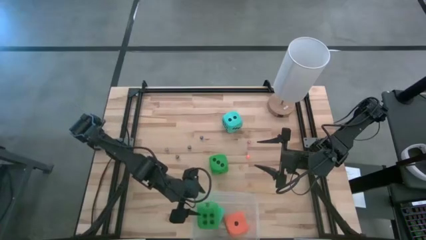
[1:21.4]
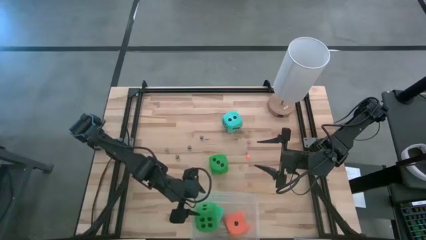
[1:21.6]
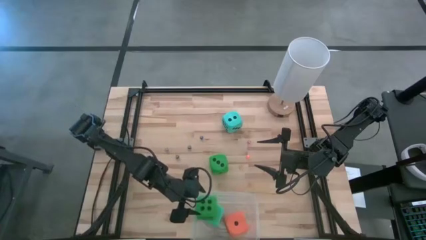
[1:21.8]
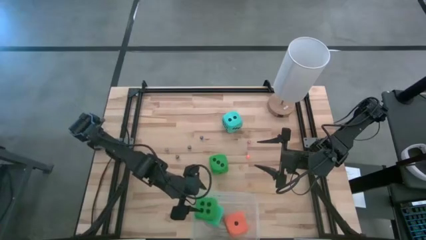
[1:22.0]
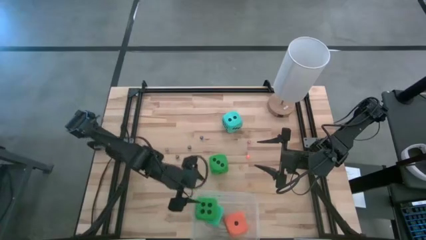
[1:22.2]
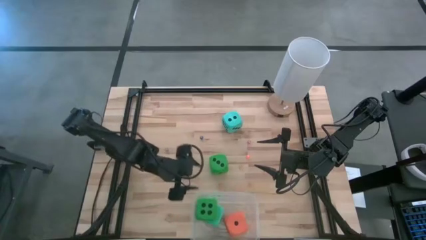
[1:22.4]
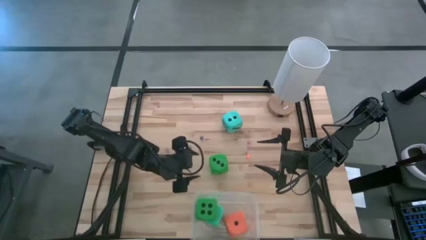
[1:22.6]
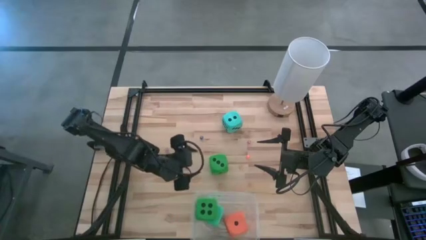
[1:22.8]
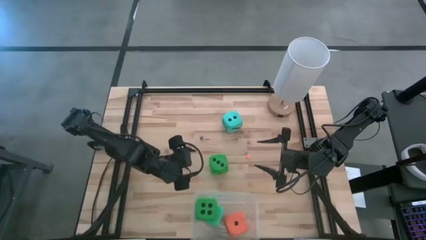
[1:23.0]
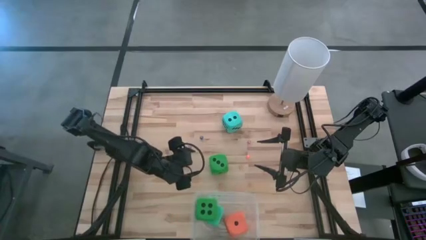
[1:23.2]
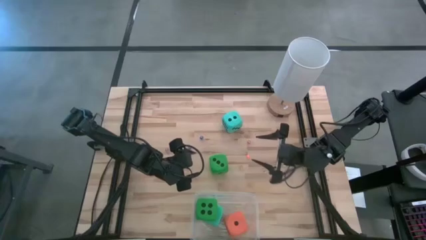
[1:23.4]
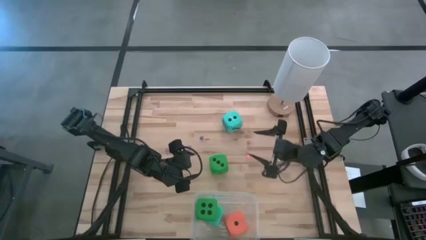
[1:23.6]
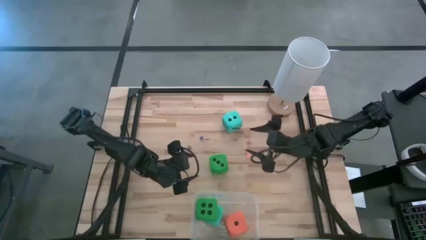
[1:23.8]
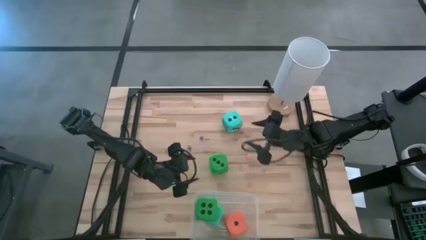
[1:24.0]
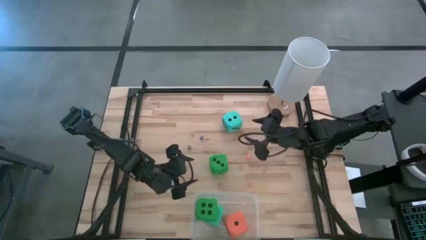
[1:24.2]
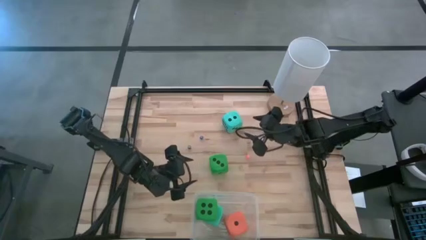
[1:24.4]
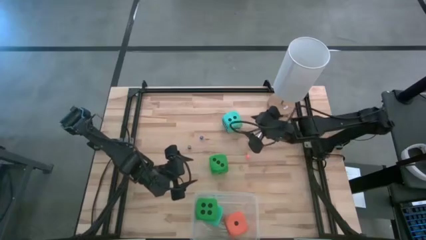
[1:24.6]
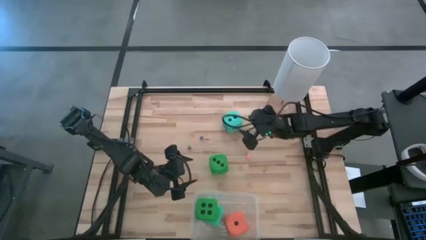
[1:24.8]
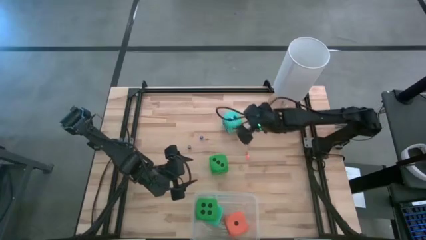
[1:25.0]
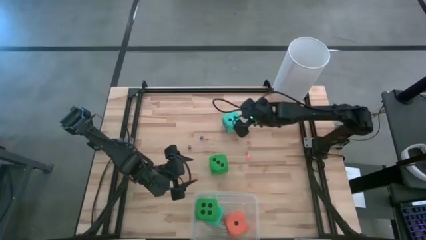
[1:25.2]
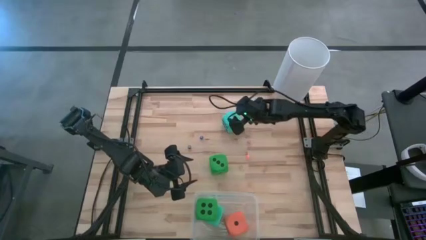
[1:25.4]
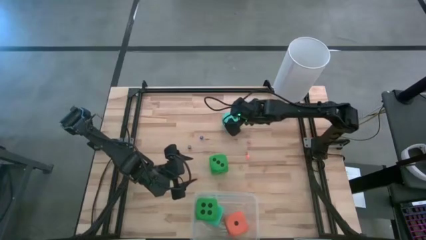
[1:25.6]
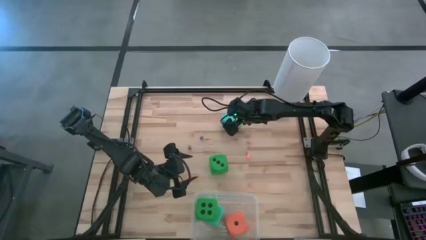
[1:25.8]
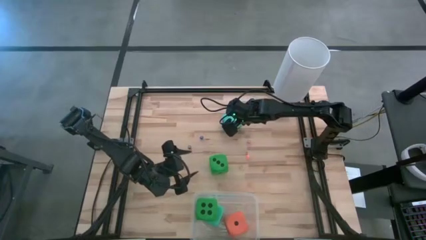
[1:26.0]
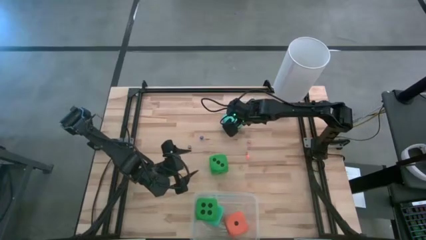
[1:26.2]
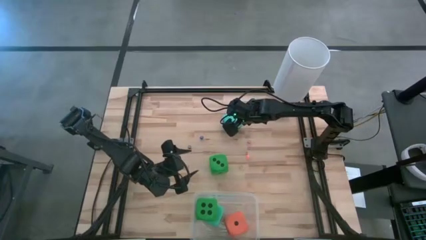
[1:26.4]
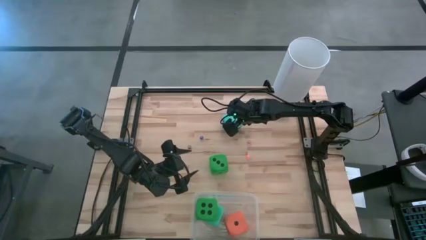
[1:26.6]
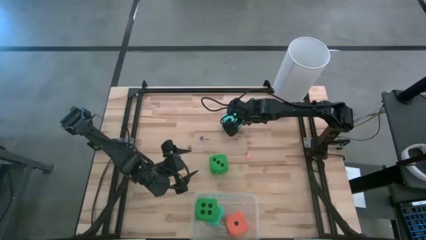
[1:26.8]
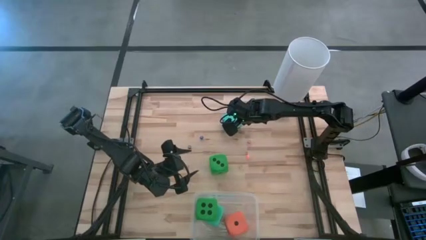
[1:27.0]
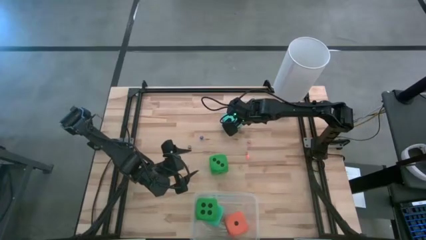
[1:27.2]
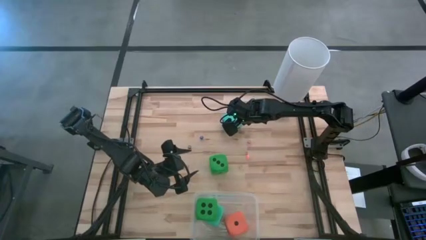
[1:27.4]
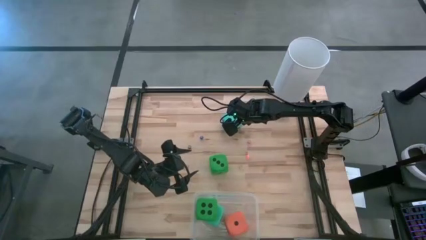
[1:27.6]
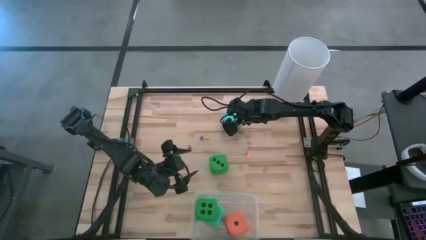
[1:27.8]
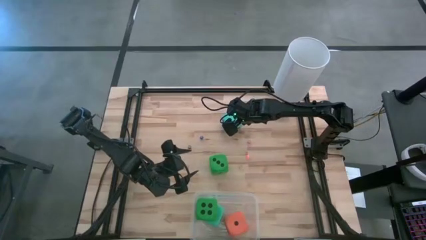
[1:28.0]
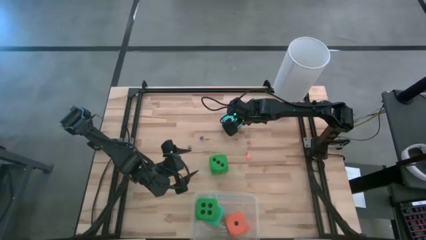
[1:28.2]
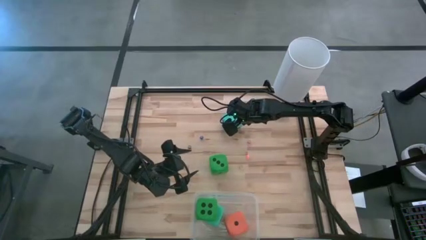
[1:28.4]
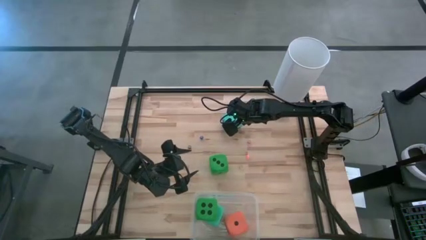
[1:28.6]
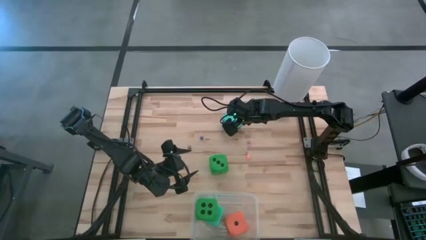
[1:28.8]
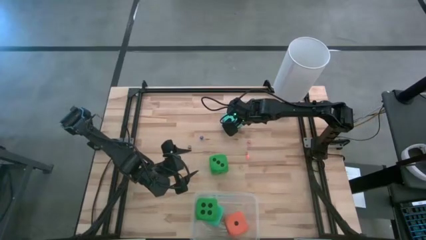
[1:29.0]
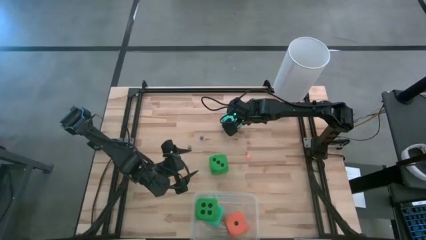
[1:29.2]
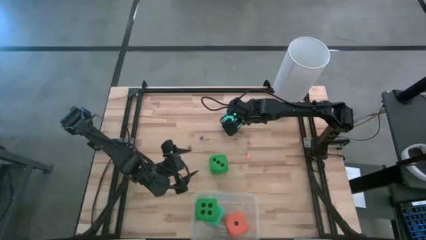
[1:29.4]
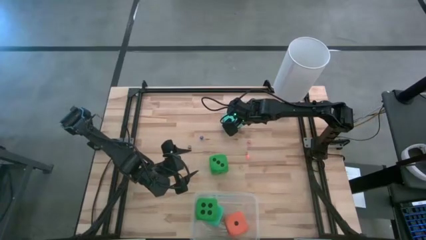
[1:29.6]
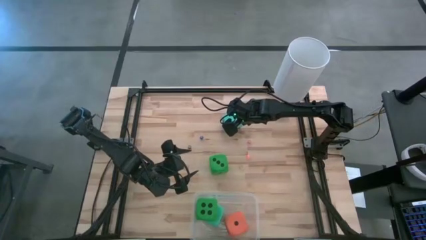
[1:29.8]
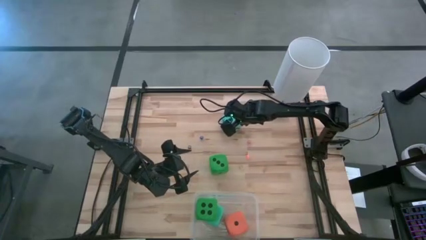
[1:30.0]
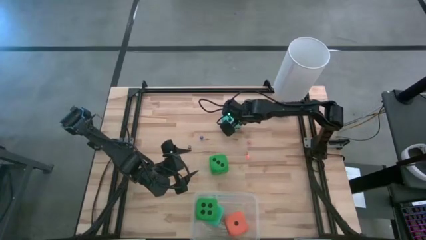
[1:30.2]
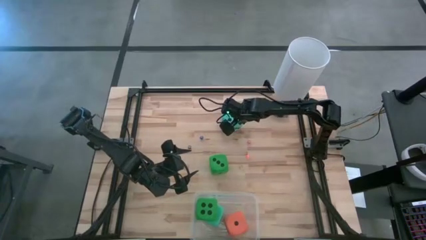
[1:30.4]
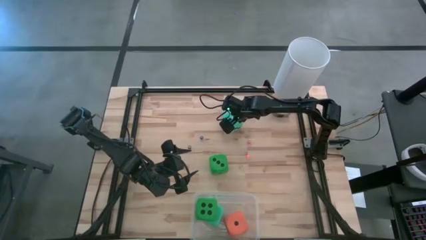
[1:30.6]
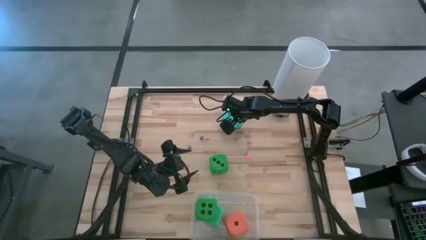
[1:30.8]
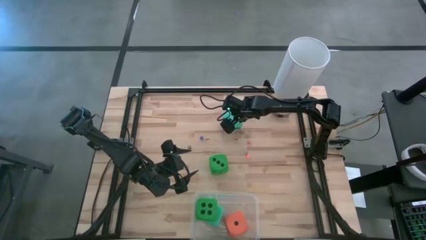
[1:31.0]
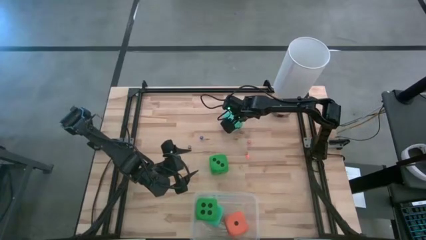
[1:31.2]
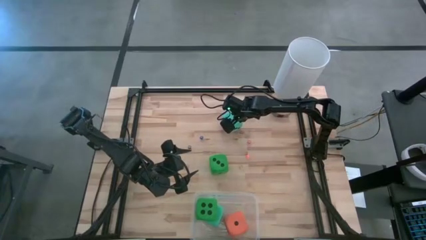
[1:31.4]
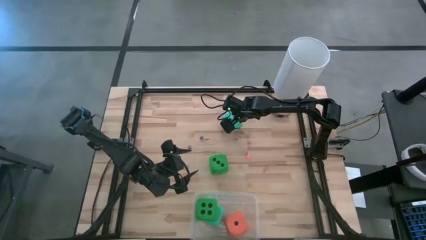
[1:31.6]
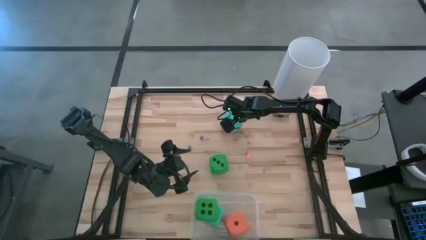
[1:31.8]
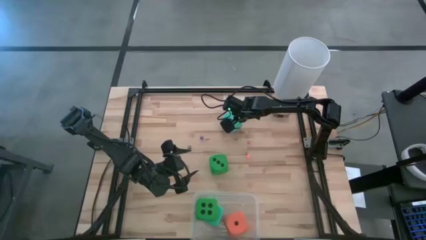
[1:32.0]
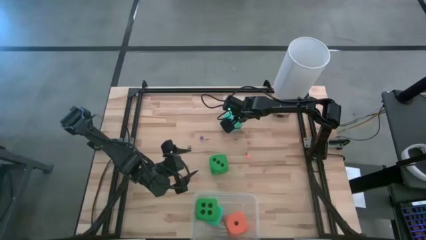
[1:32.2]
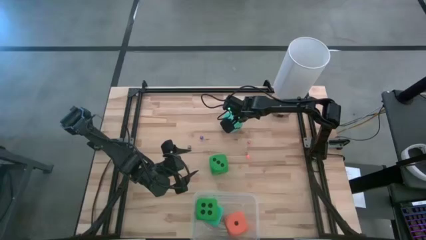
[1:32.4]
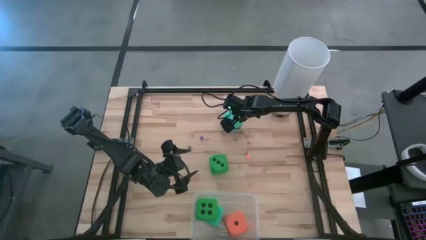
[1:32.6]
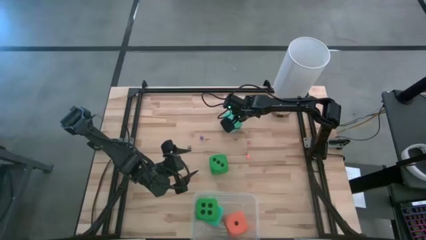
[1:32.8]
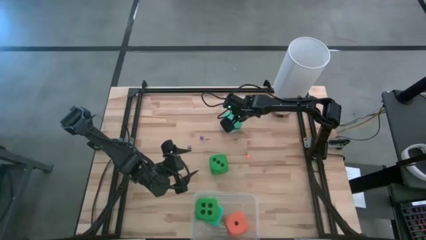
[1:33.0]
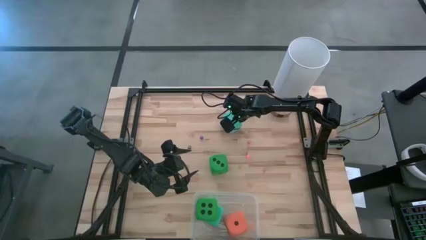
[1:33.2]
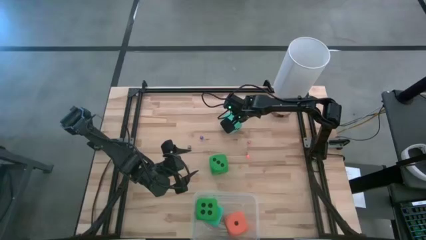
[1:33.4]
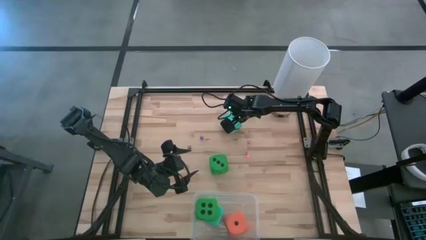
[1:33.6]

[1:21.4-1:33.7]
Task: Pick & Place Dice
Put the large blue dice into the transparent bin

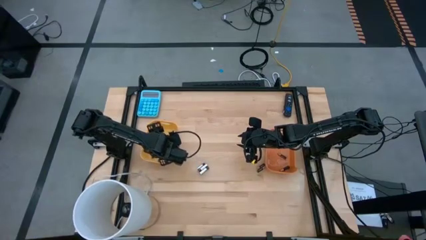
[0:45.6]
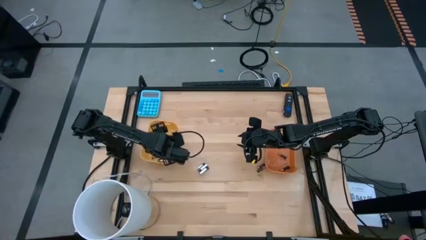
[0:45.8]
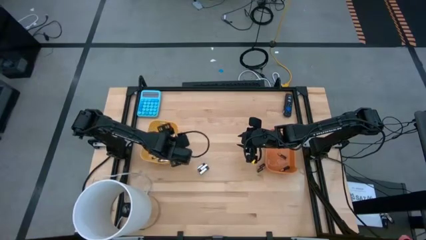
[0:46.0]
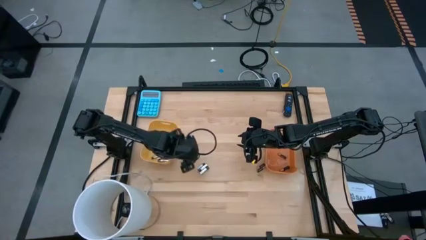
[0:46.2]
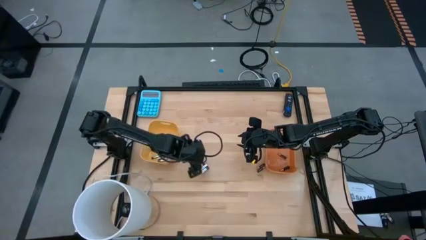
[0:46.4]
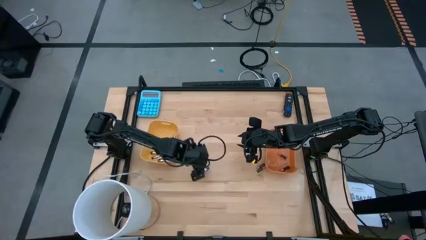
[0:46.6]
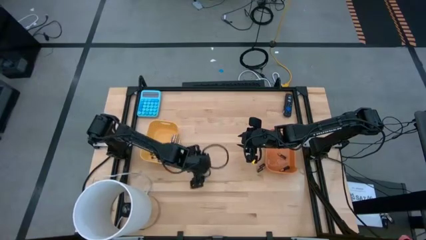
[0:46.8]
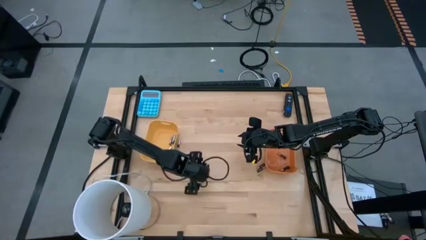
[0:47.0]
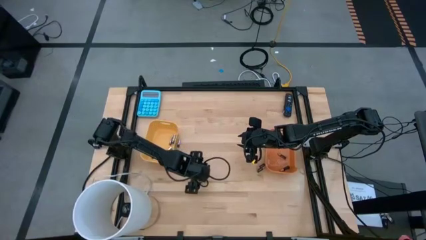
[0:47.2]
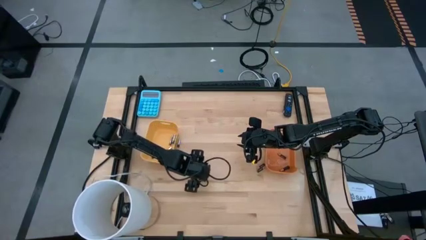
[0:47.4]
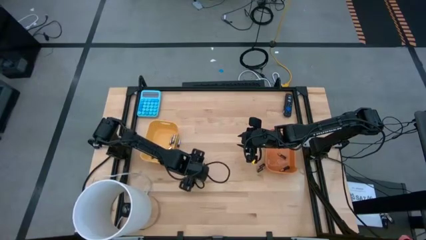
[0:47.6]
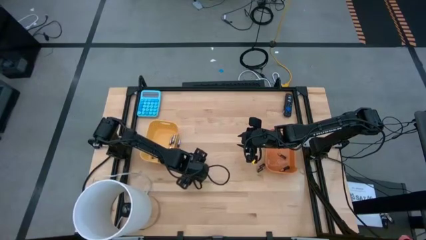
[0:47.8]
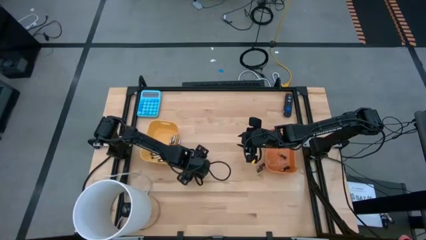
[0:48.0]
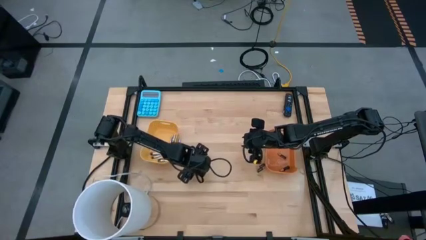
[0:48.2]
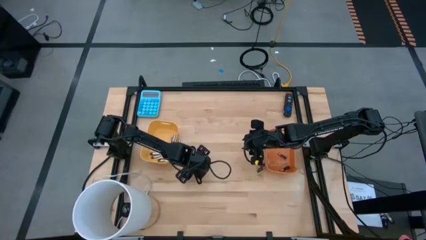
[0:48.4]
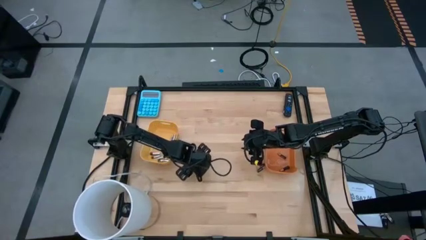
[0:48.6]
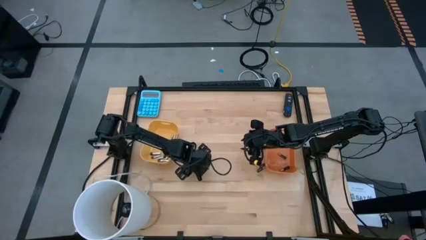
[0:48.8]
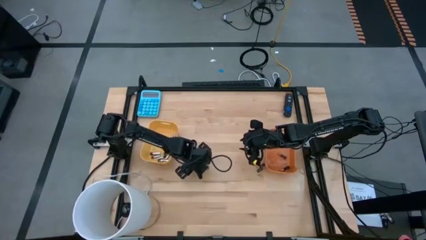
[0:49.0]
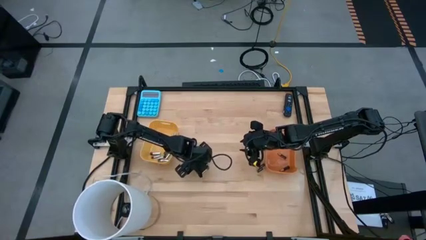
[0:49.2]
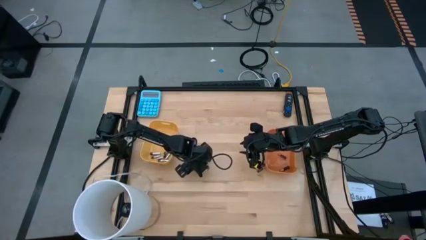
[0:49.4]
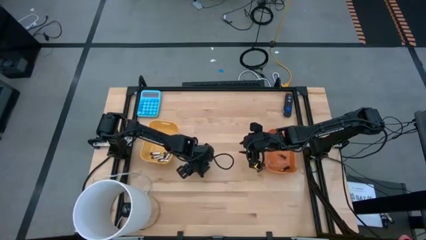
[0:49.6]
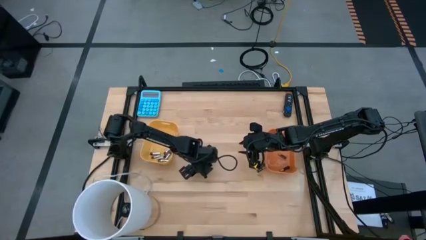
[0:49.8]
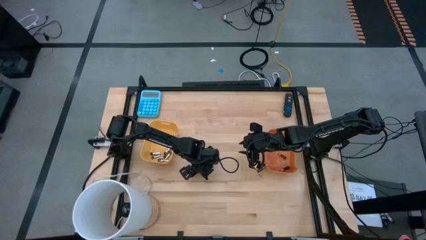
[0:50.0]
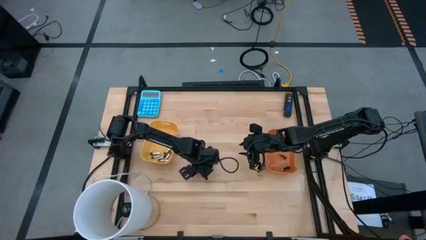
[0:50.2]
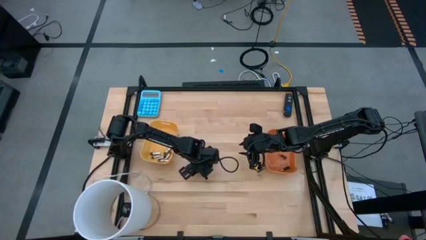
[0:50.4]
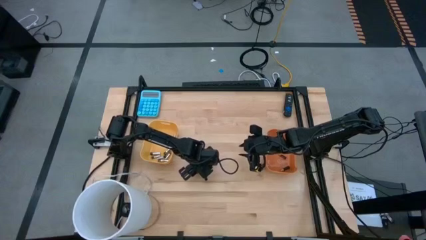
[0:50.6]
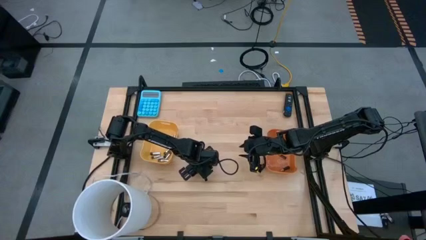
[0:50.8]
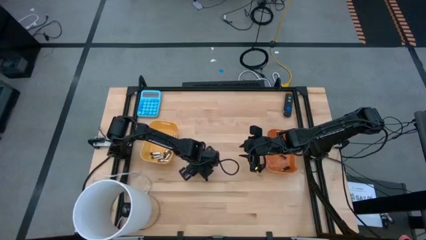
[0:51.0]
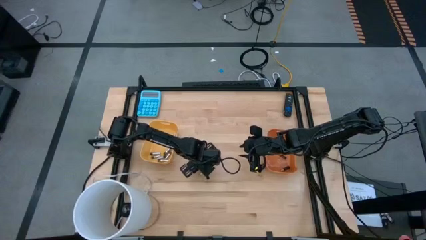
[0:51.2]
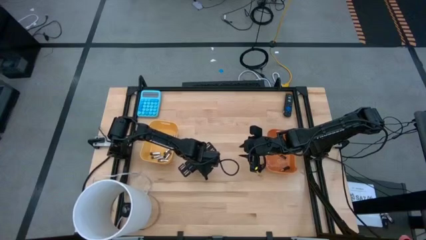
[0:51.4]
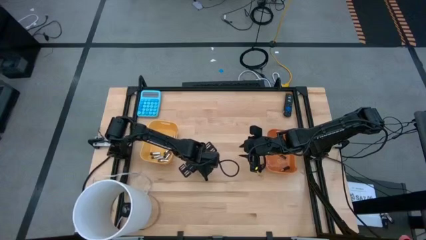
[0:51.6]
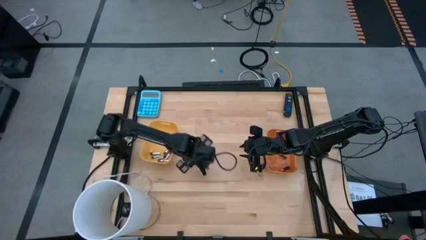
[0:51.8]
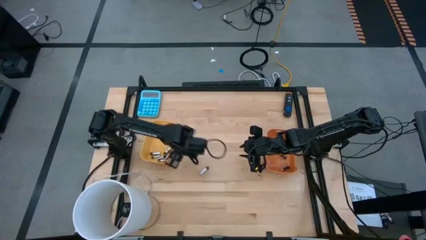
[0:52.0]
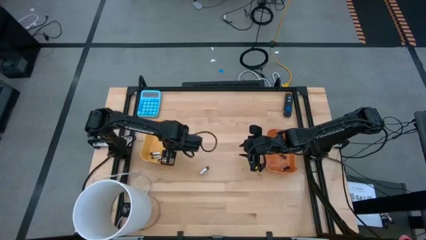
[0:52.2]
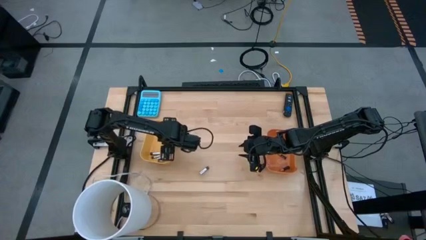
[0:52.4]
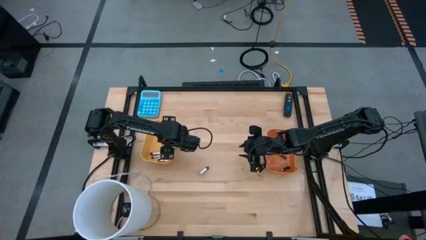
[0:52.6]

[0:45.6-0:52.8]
Task: Sort batteries
Put the silver battery into the yellow bin
